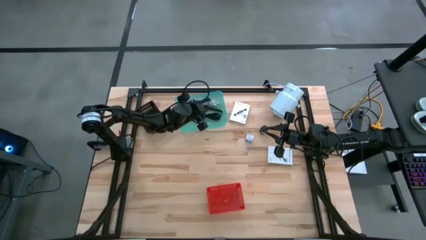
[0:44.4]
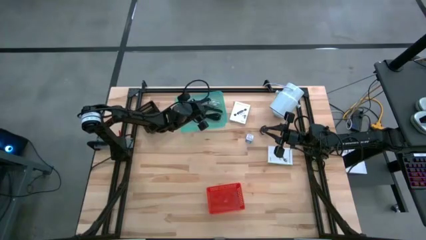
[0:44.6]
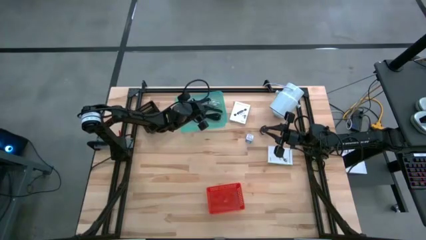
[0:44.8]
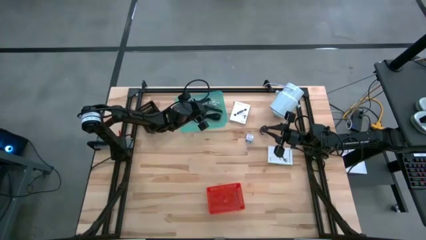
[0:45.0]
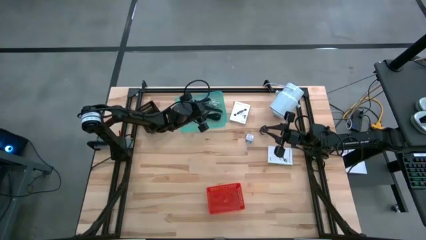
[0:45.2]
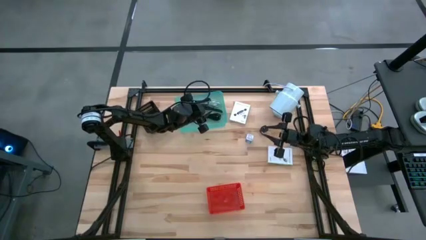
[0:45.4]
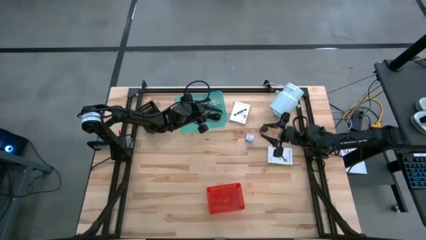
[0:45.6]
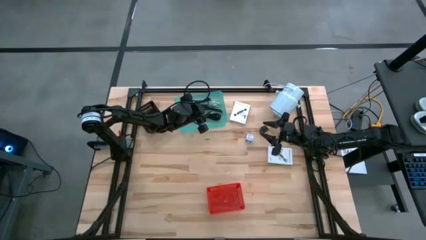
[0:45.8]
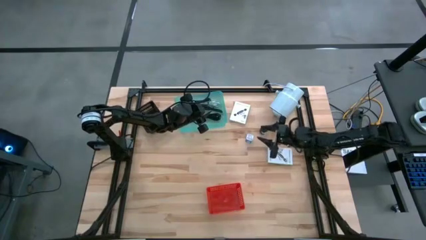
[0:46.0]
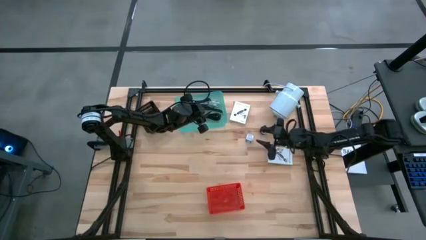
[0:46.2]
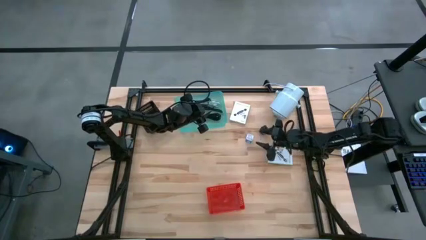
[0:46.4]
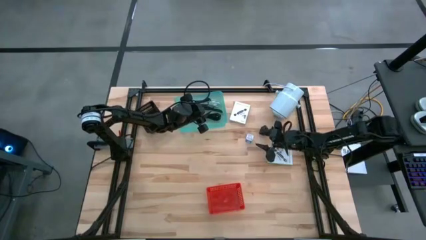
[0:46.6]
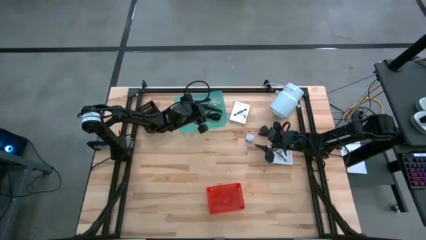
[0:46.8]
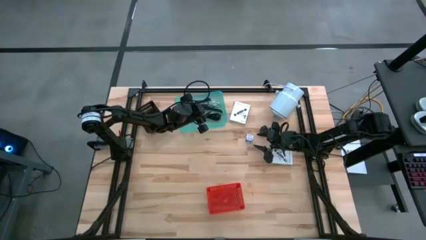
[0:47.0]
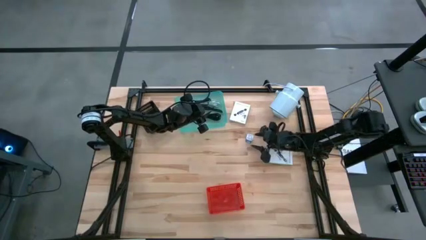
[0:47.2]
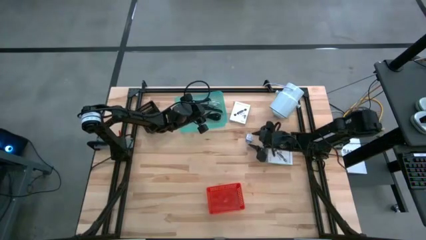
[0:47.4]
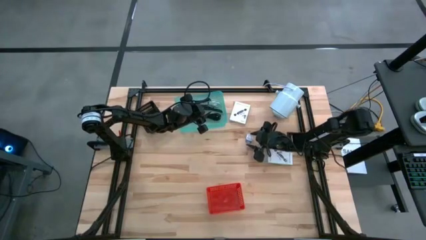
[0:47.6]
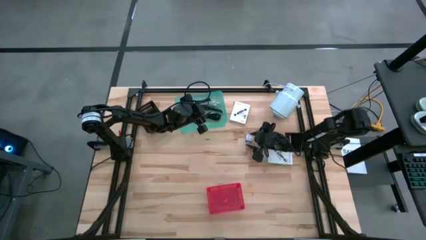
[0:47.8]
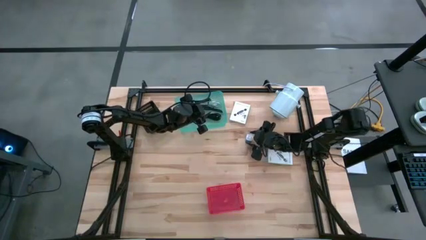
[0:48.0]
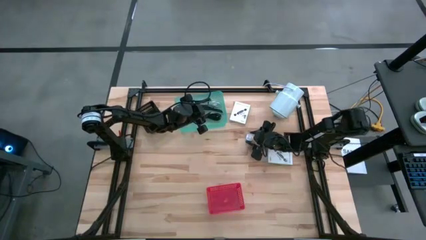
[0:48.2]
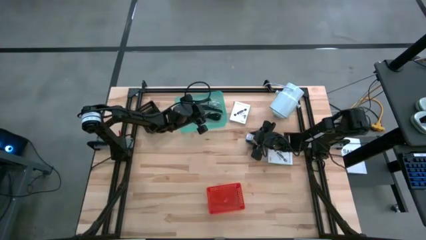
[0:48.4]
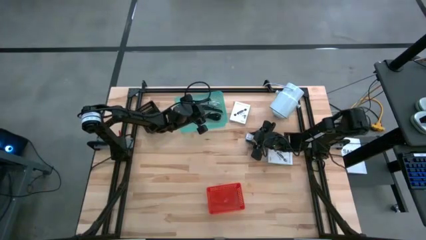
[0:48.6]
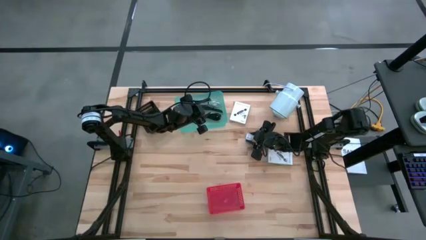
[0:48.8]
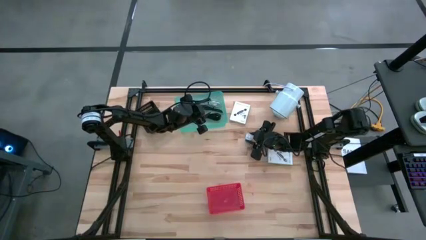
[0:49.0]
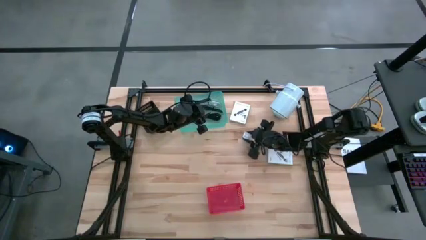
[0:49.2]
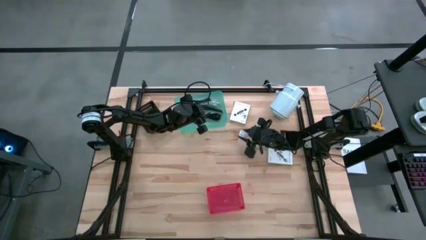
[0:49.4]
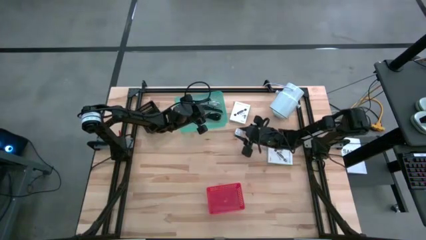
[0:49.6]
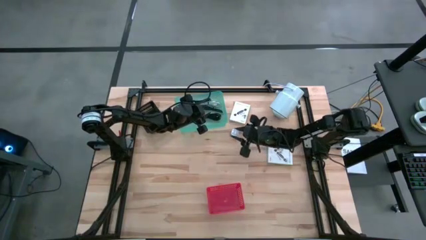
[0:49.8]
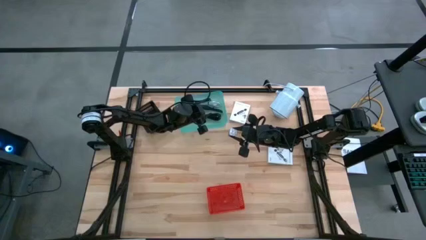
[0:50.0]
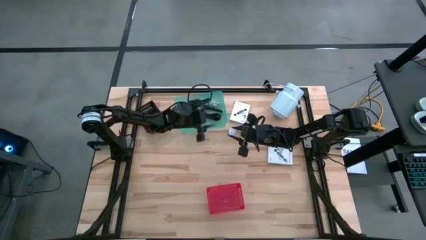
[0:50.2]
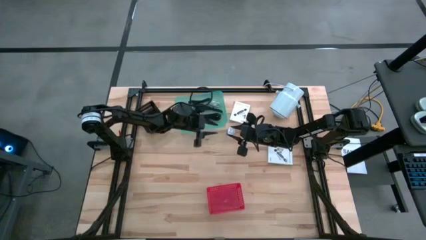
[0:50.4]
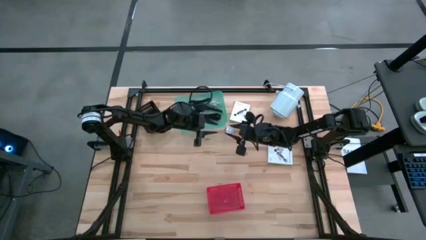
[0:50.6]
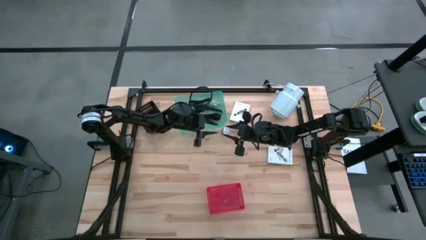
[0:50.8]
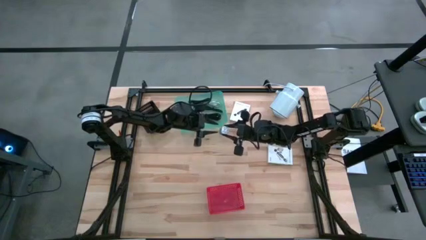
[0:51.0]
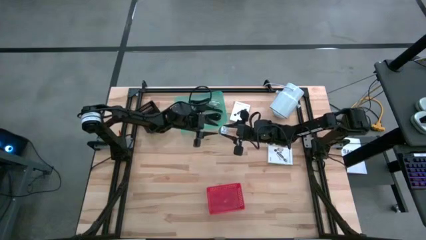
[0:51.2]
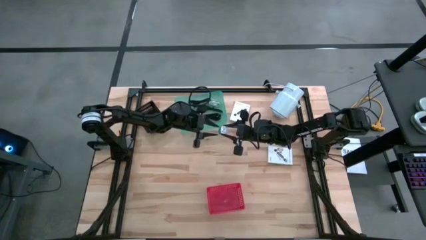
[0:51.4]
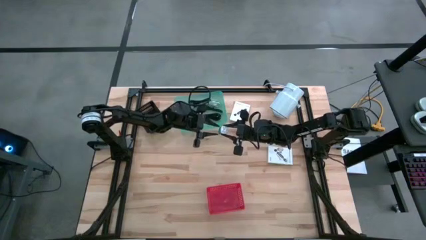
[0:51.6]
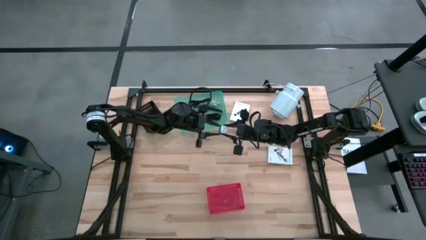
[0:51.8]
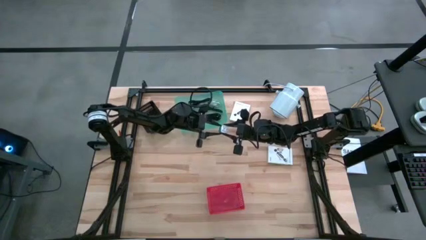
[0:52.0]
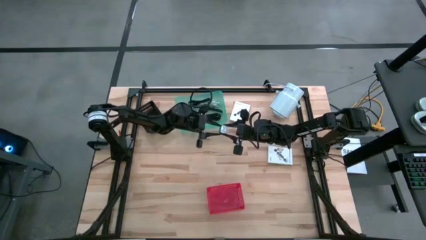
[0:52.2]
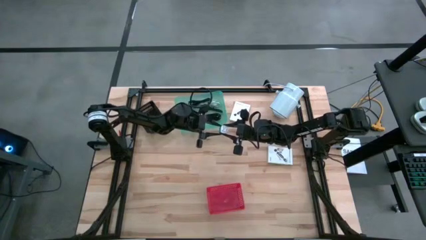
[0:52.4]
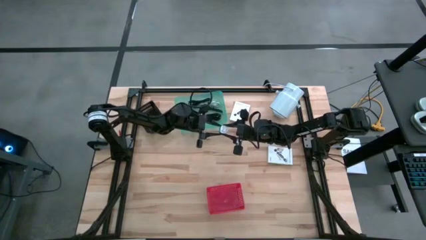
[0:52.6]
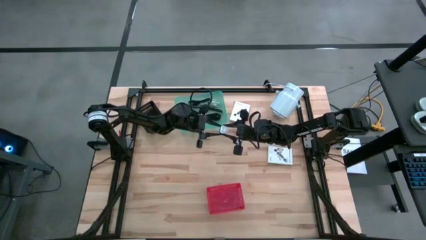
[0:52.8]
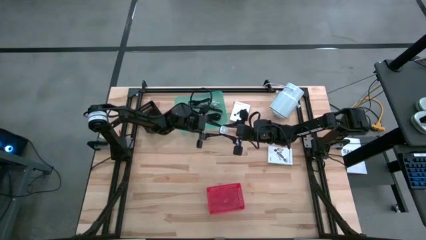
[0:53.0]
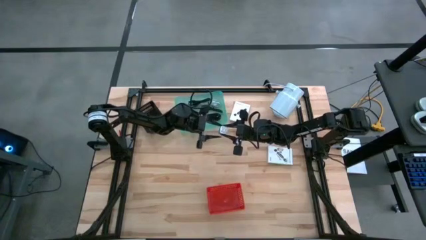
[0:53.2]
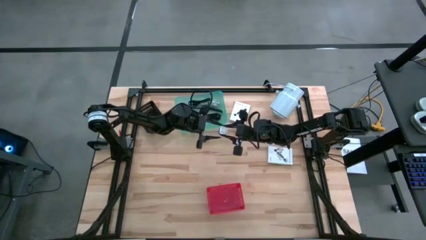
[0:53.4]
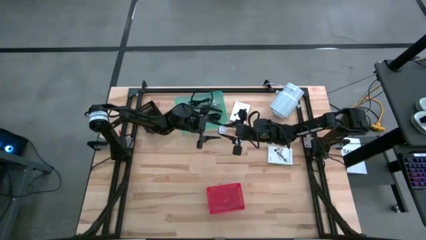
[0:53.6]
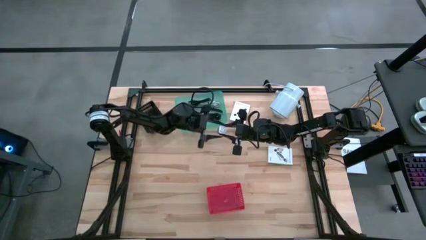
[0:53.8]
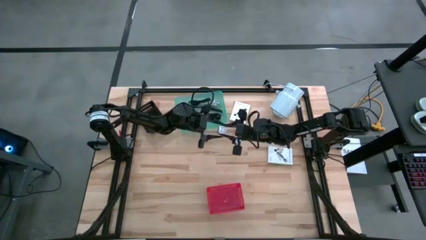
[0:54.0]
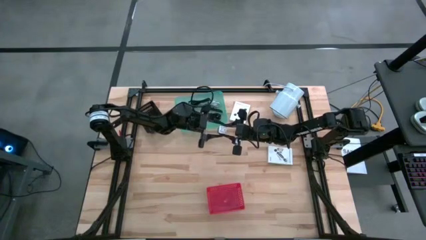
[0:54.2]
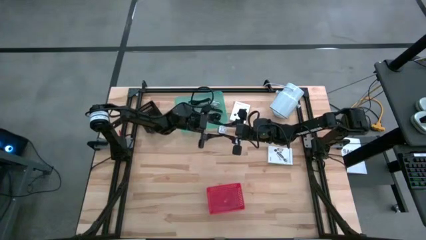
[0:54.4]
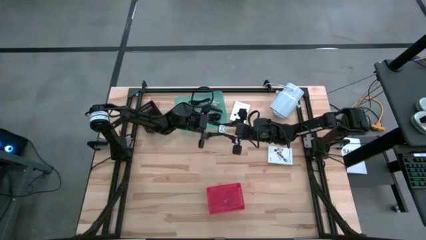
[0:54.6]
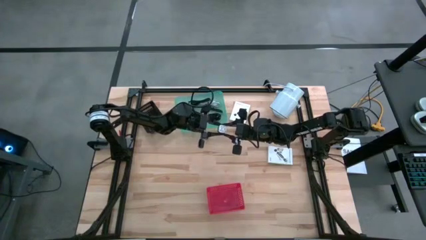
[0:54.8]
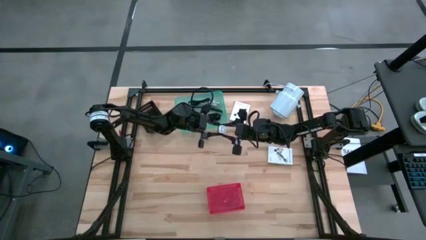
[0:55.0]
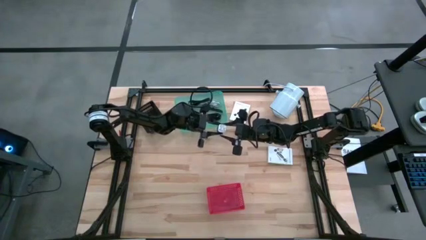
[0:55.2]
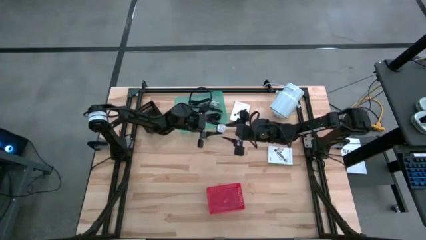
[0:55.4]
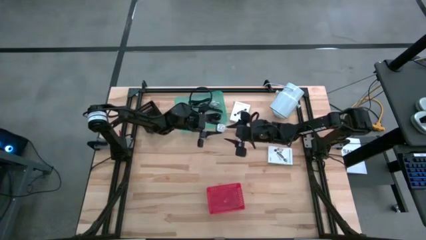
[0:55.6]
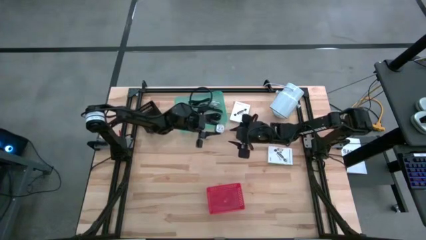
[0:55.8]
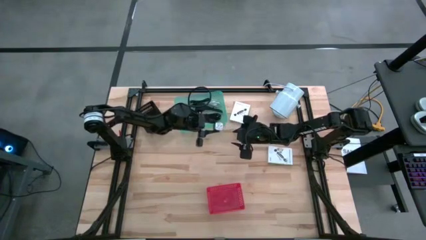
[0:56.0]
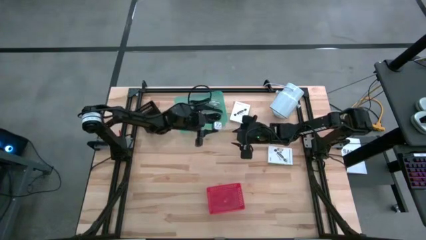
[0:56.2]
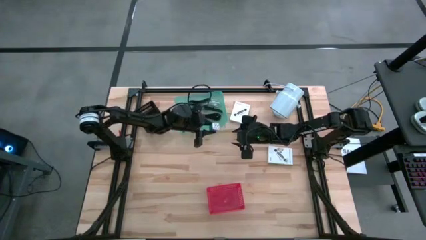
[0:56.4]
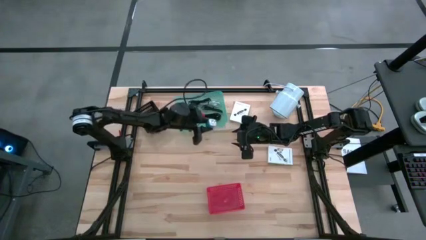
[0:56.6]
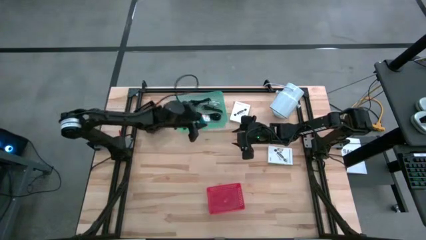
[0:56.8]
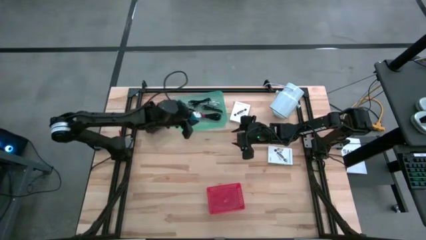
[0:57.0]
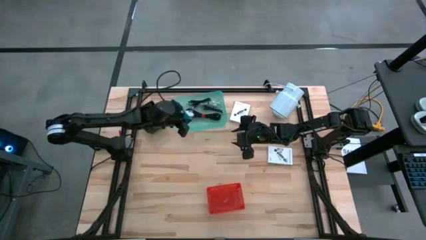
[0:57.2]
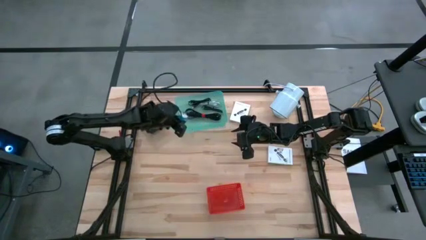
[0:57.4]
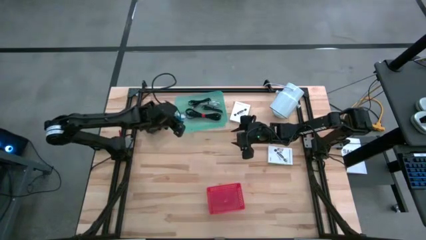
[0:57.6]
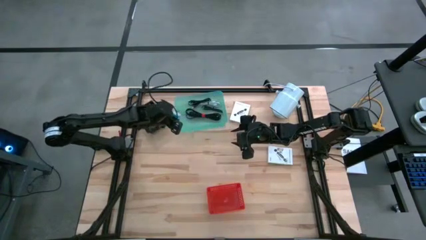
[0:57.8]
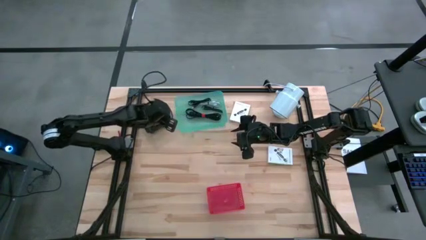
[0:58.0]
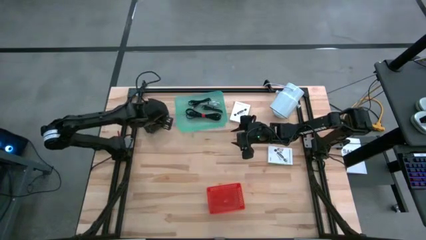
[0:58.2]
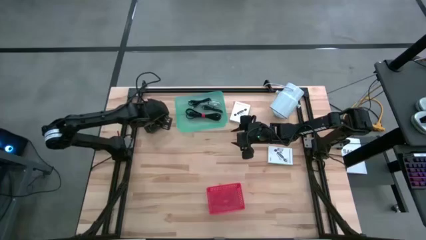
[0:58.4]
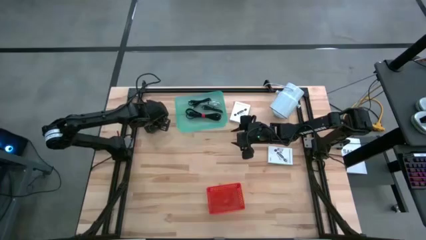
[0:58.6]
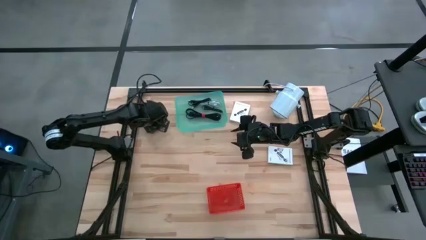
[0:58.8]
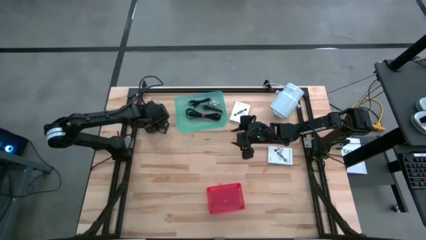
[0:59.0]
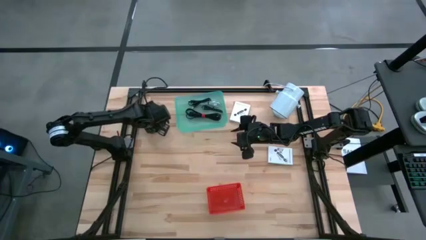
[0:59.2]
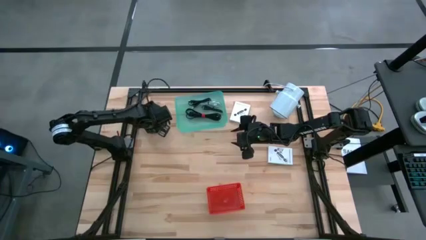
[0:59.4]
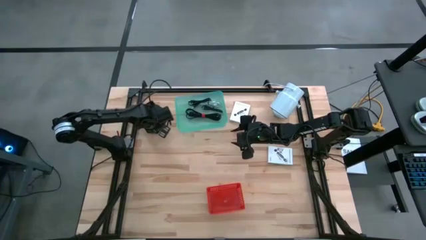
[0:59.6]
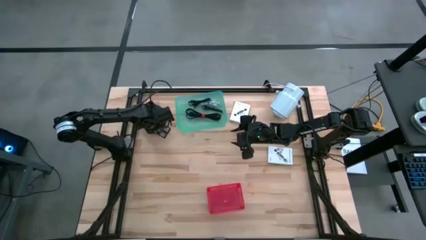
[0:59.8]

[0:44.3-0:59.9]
Task: Pick and place items into bin
Put the blue charger adapter into the black bin
